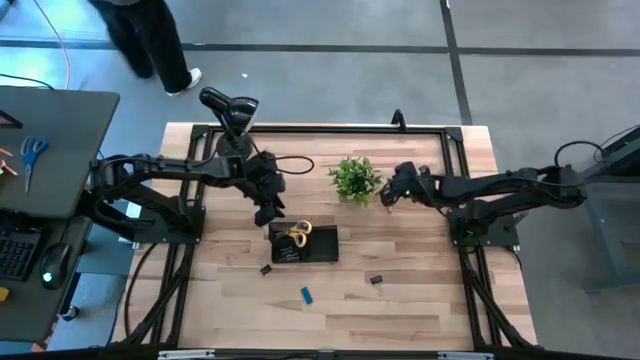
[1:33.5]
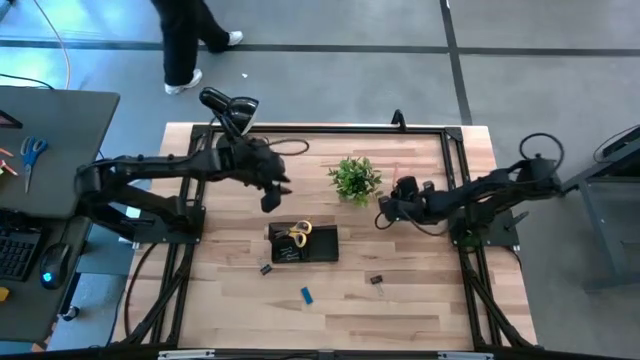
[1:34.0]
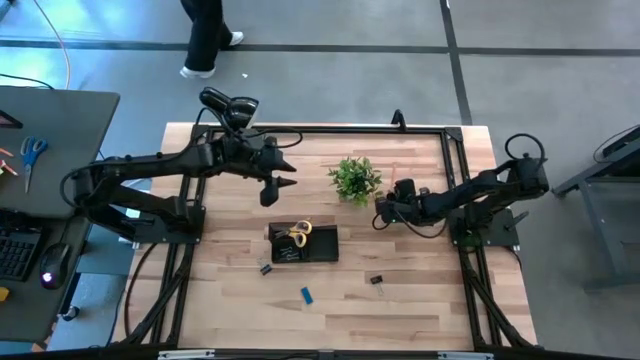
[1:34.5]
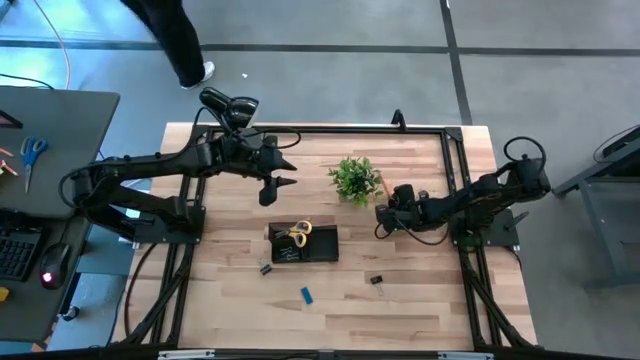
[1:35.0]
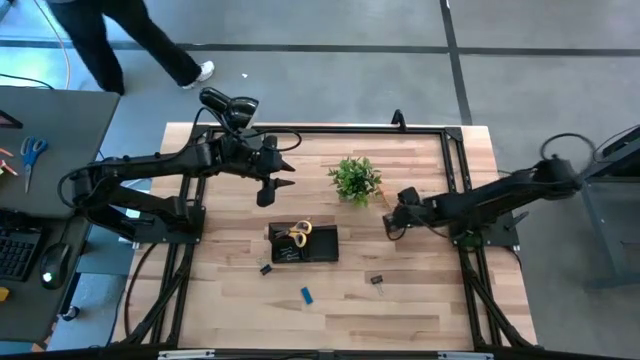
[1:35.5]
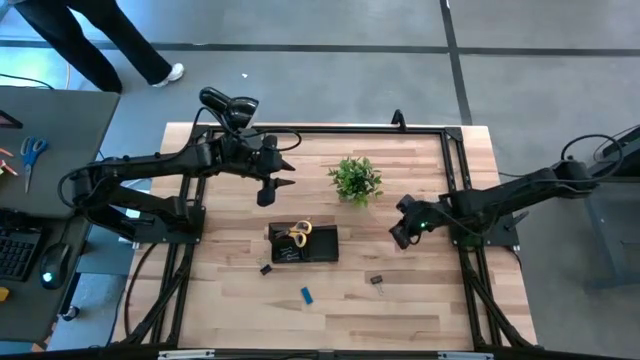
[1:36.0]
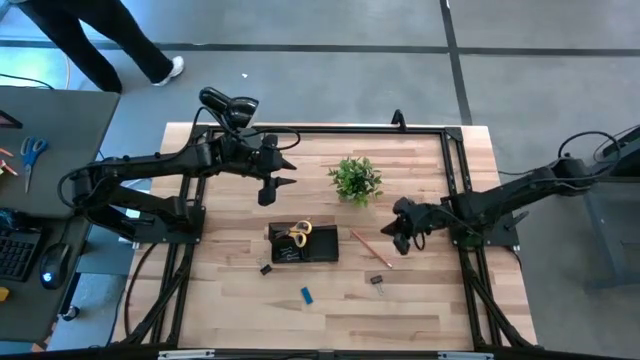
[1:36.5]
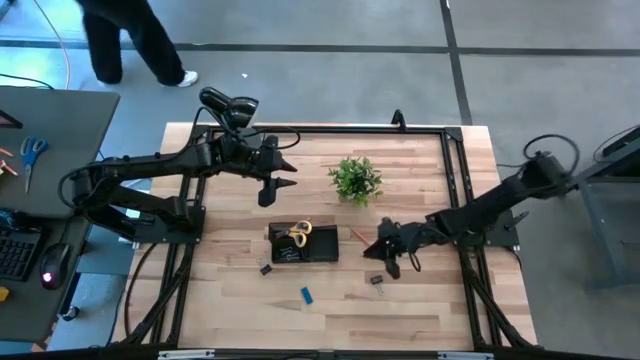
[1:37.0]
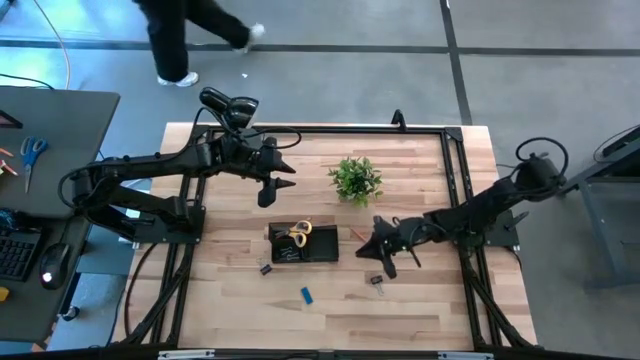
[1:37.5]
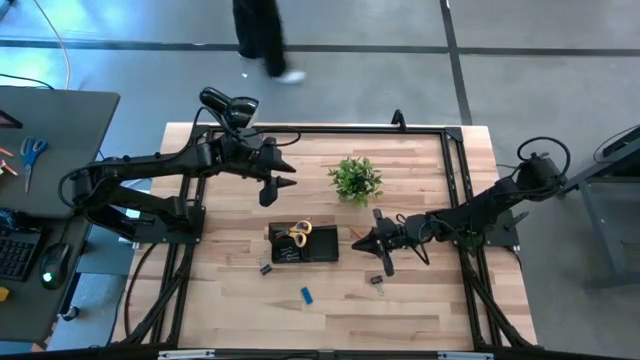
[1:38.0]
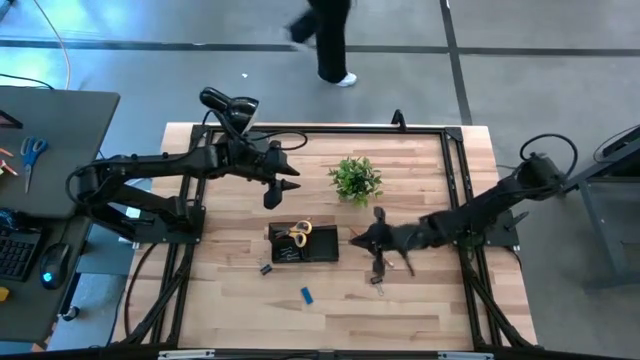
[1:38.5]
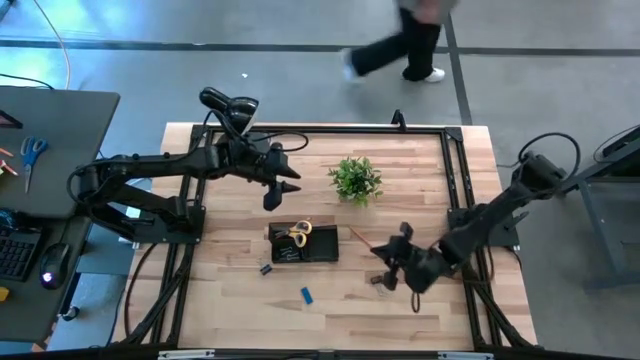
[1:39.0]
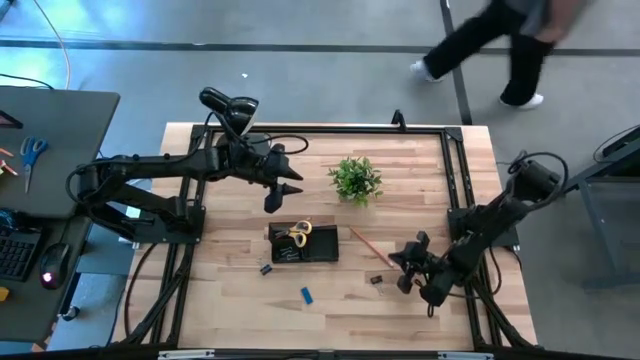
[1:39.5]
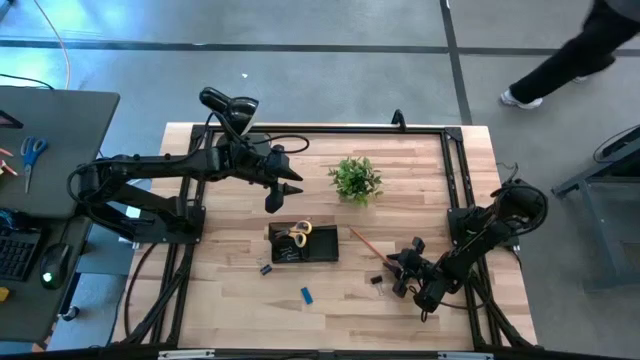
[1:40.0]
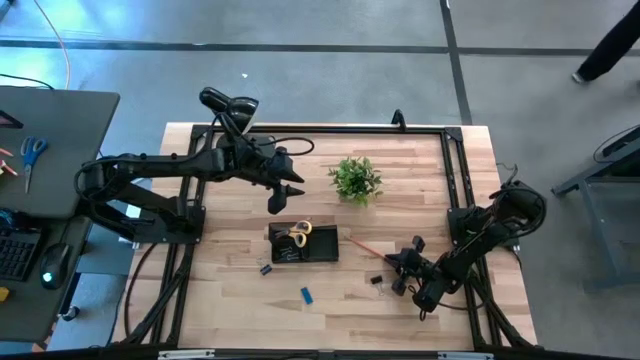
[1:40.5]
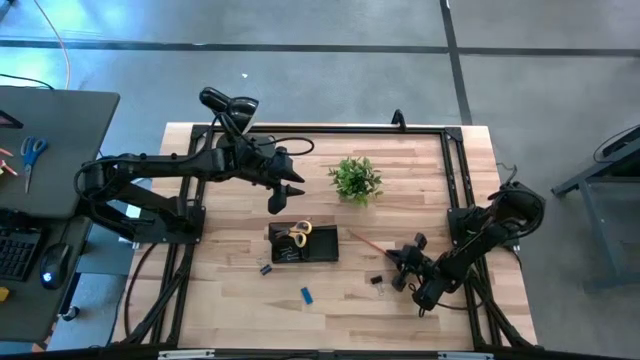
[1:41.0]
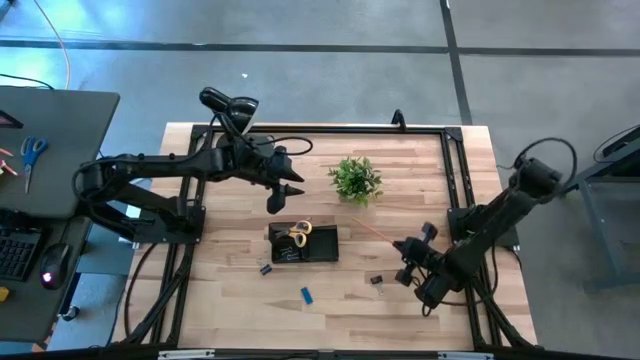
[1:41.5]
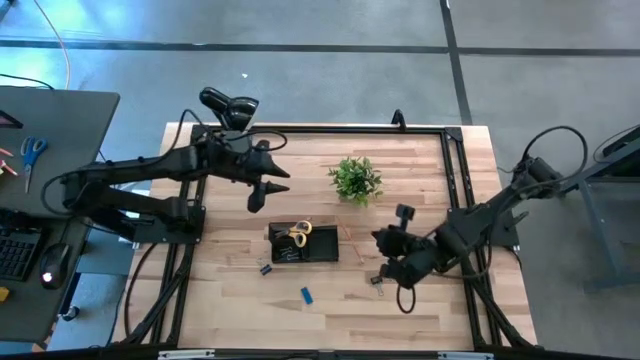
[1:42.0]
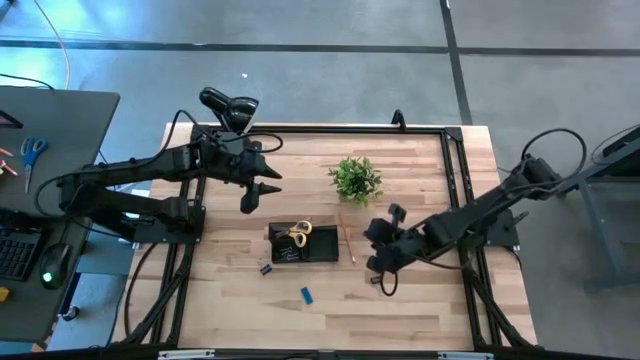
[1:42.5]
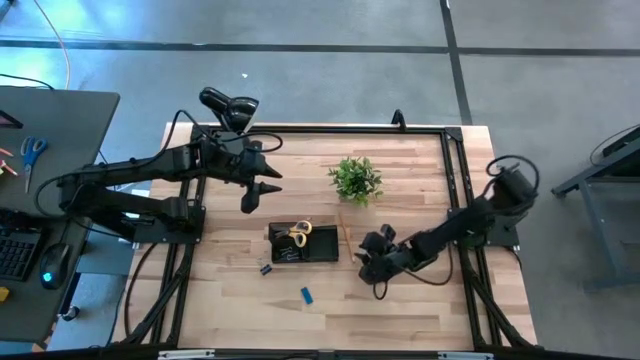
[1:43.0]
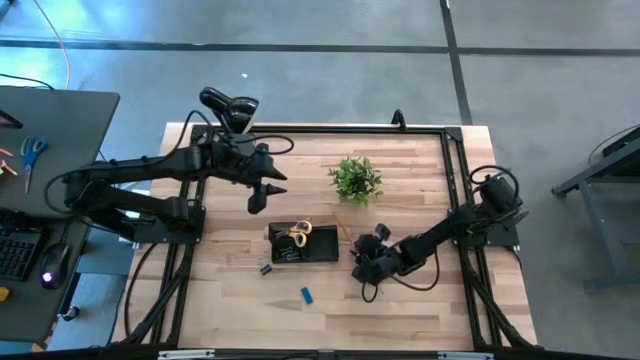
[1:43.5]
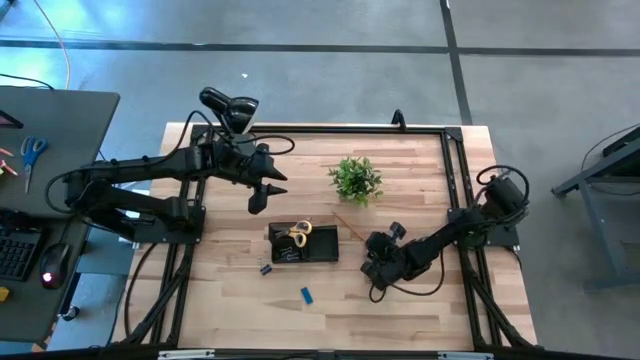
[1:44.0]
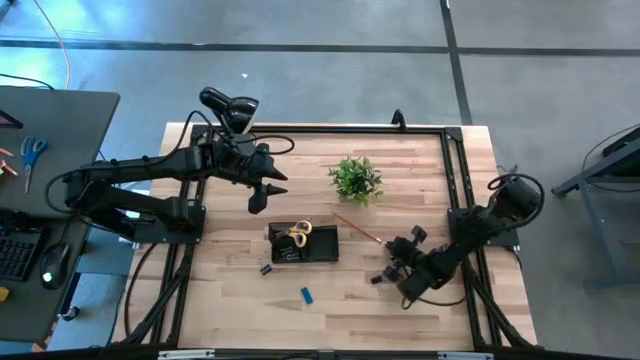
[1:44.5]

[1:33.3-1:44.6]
Task: Pick and place office supplies into organizer
Put the orange pencil into the black desk organizer

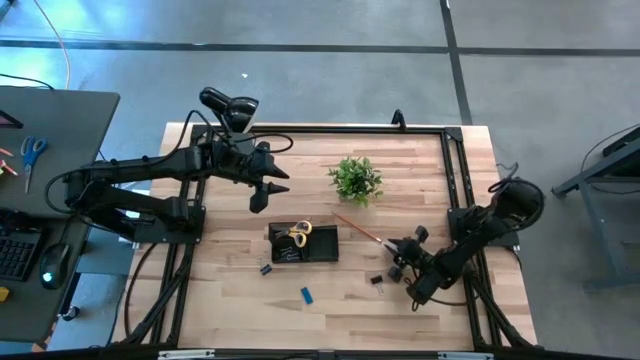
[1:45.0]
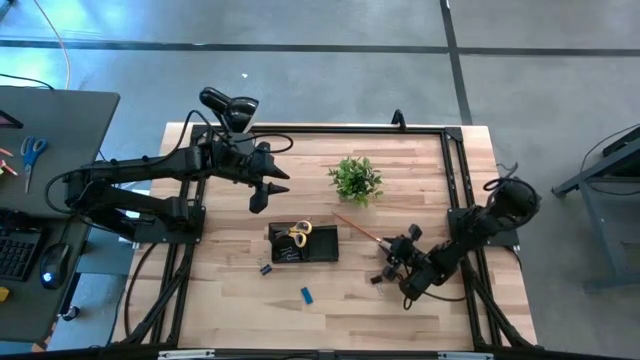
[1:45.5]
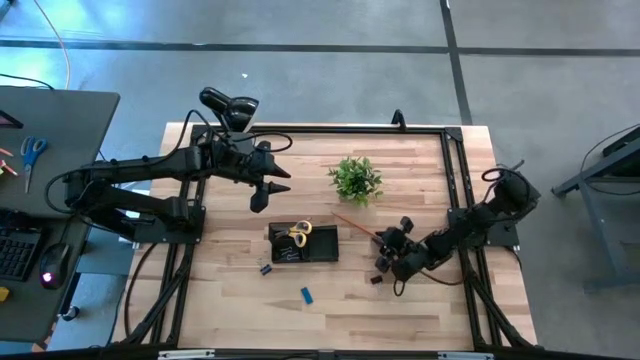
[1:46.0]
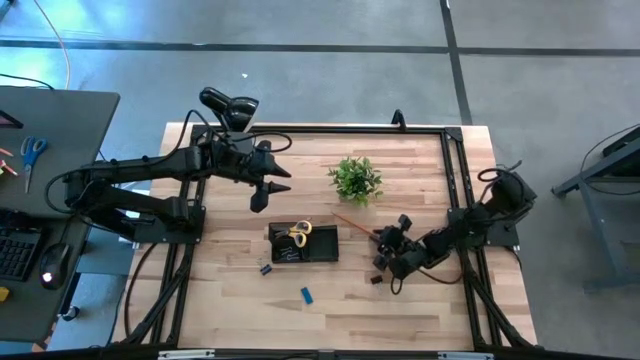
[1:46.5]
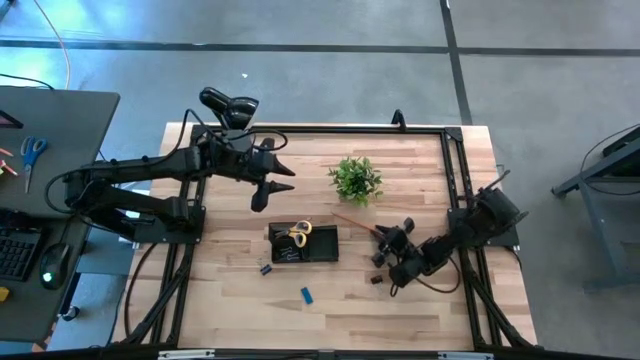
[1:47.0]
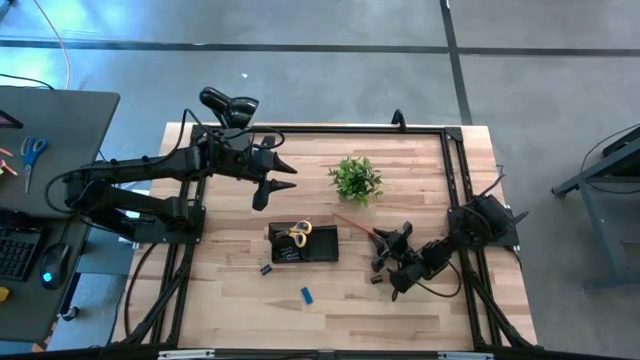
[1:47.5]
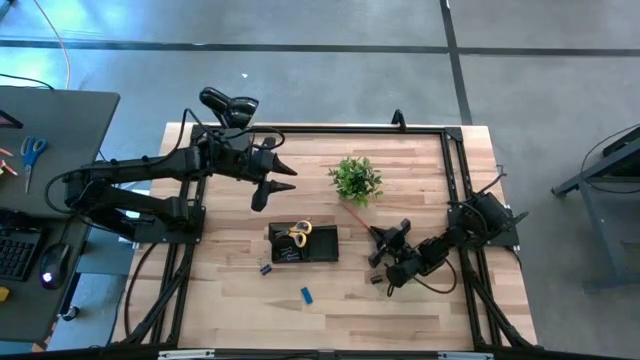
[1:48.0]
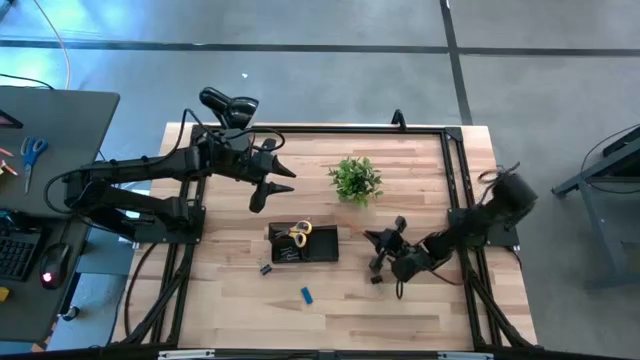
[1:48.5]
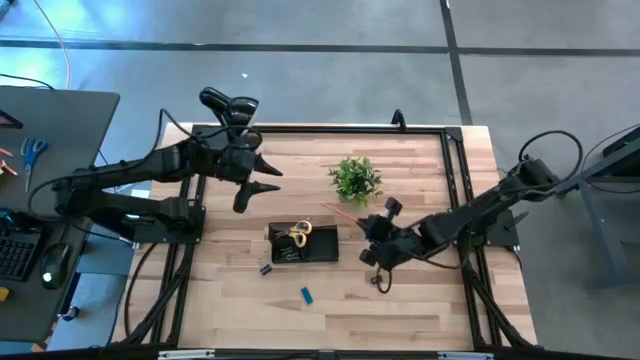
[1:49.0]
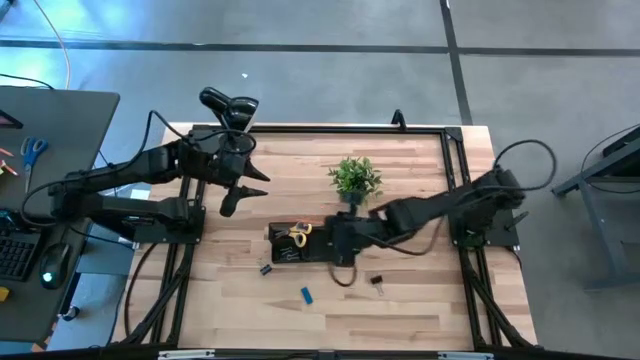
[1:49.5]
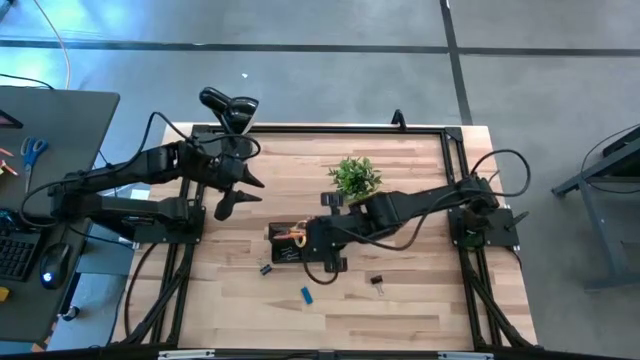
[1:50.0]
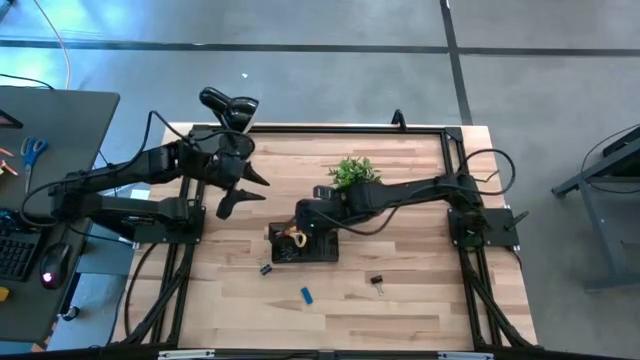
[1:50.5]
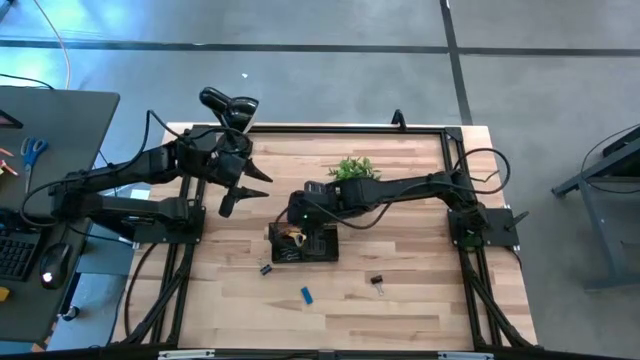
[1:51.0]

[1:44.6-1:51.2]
Put the orange pencil into the black desk organizer

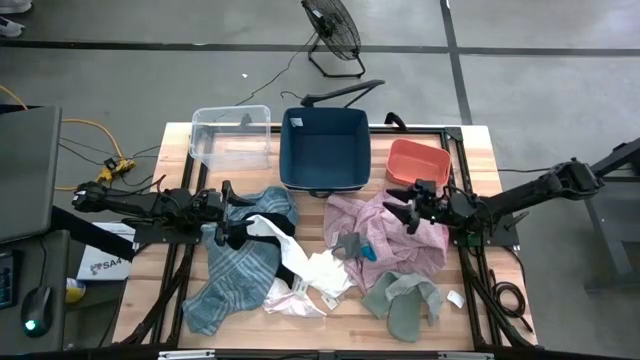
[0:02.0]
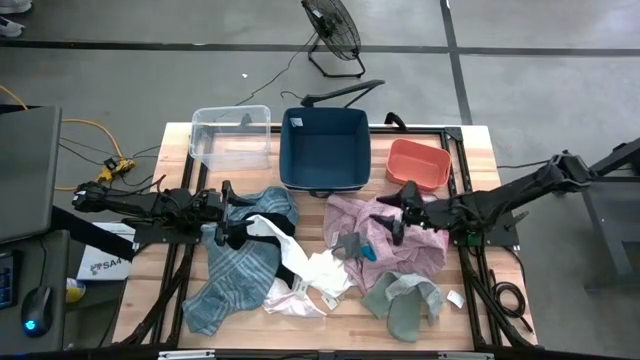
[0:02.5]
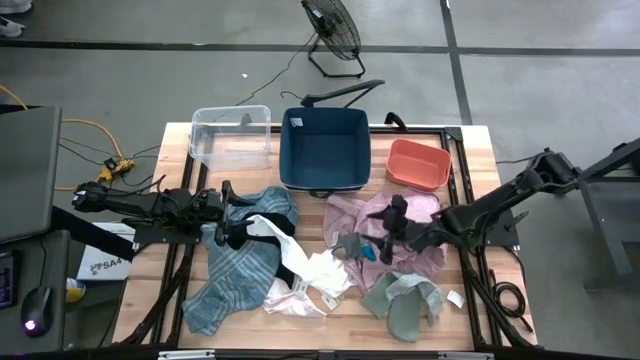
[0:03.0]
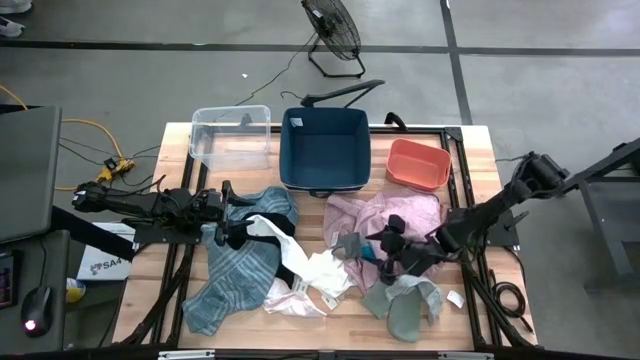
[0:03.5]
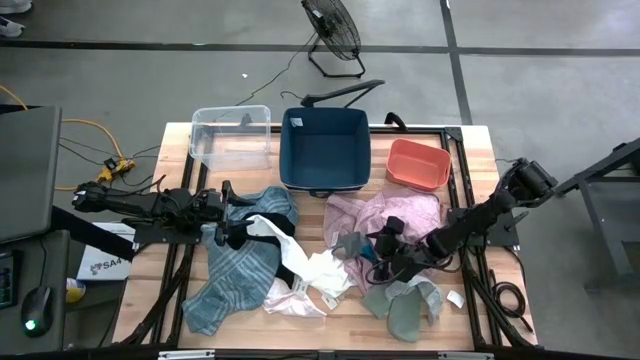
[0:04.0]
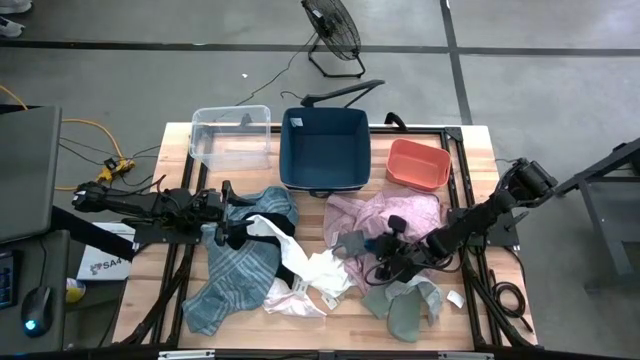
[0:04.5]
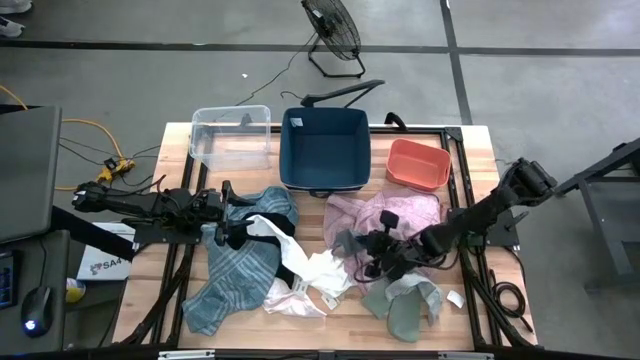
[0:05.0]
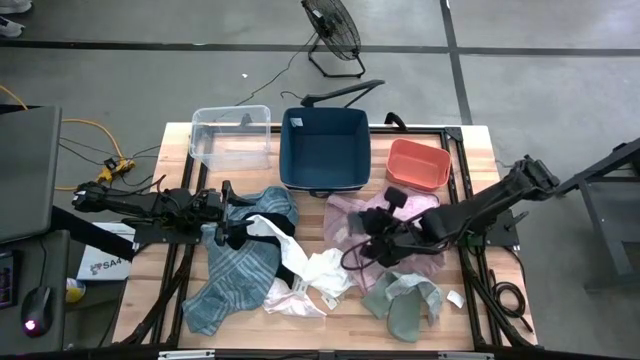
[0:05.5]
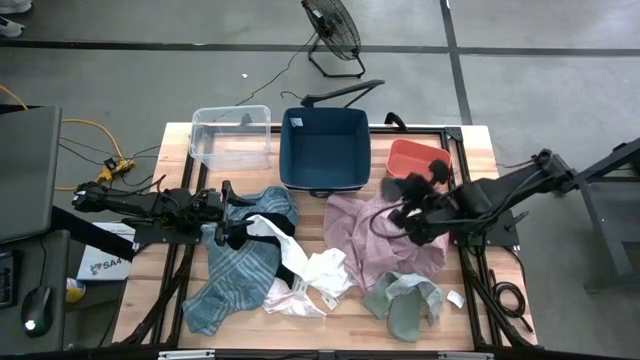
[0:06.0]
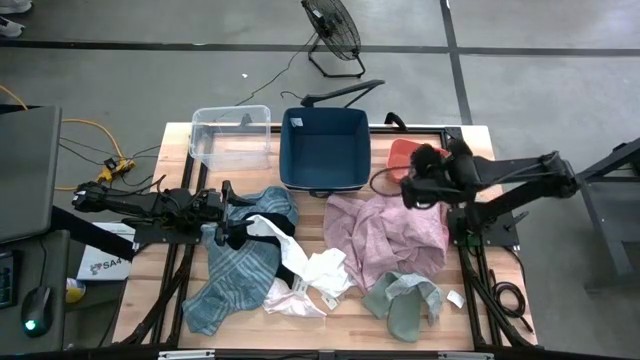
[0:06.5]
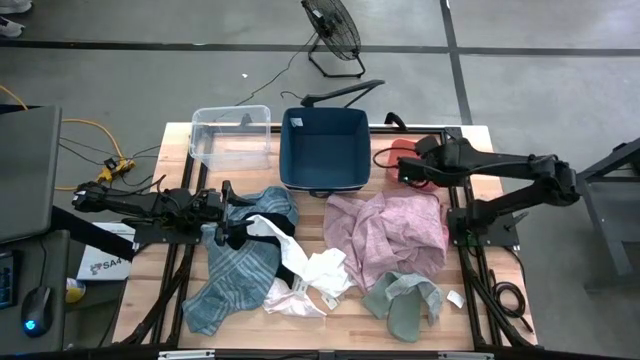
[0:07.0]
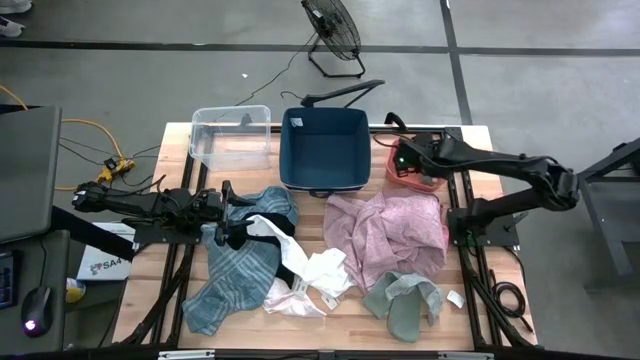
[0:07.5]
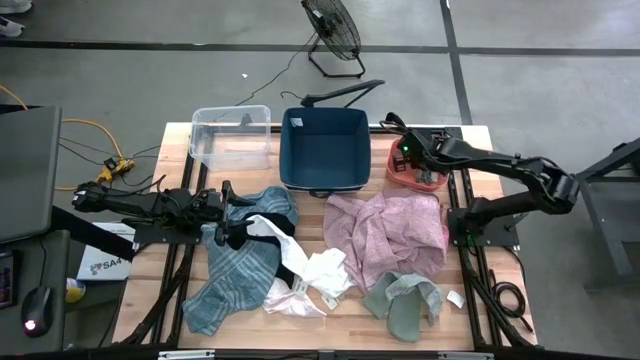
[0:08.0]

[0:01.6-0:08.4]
Task: Pick & Place Cloths
Put the gray sock into the orange bin
